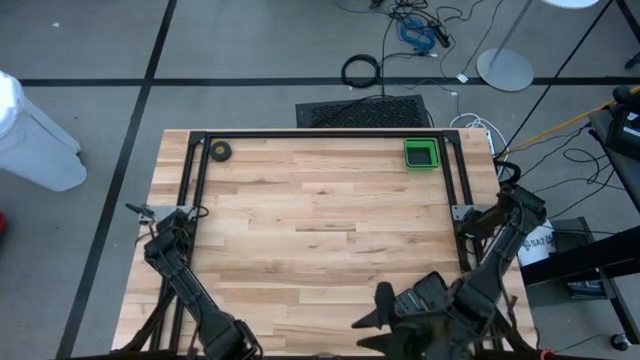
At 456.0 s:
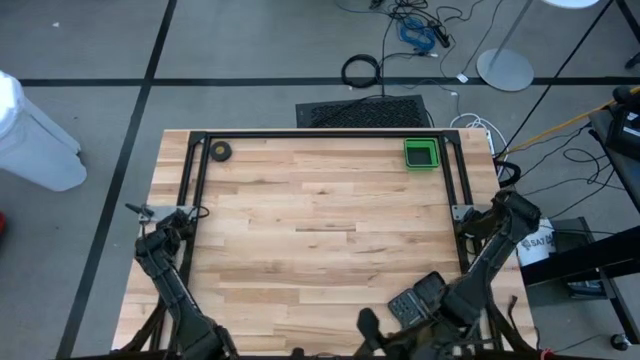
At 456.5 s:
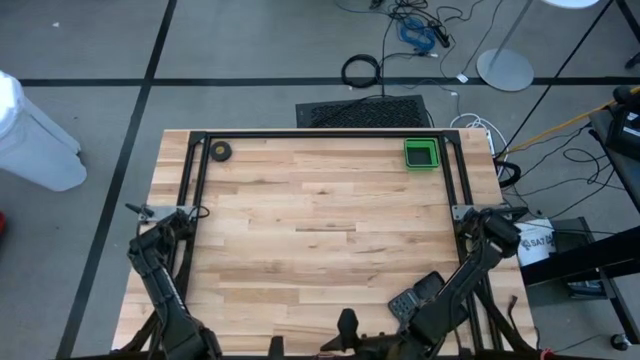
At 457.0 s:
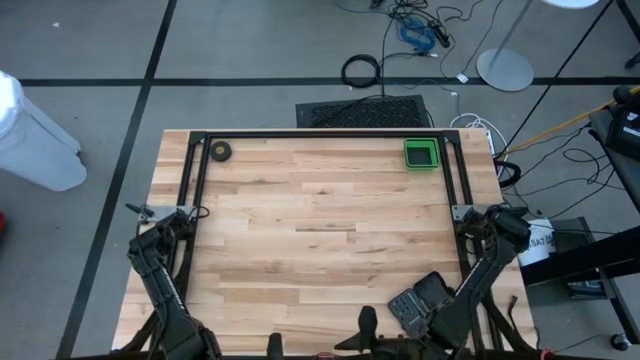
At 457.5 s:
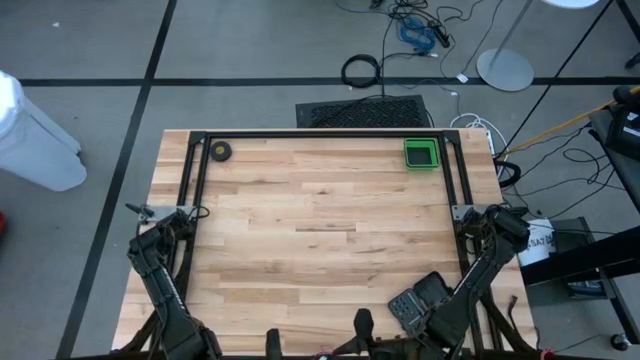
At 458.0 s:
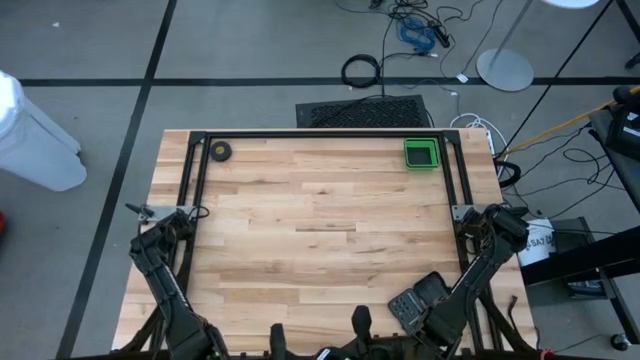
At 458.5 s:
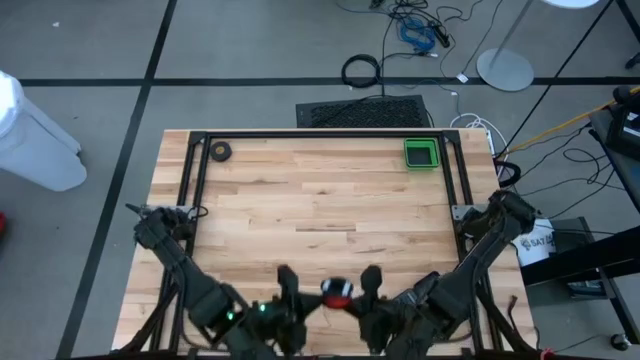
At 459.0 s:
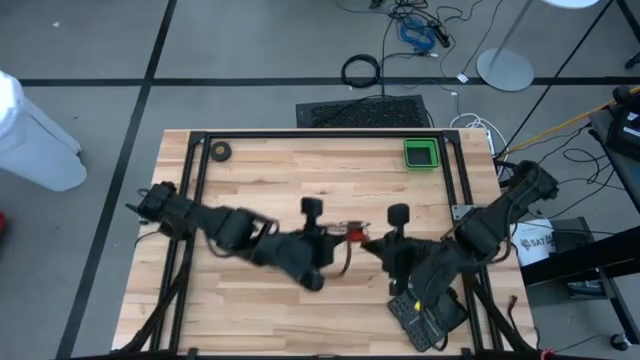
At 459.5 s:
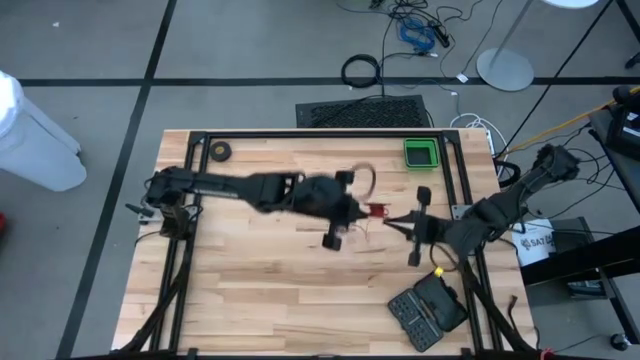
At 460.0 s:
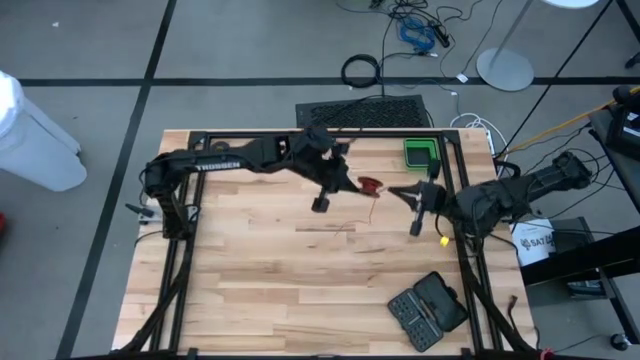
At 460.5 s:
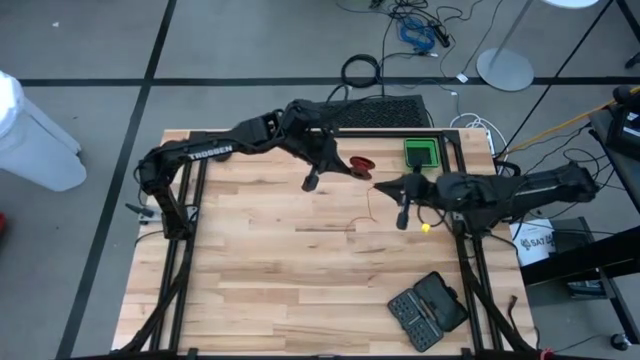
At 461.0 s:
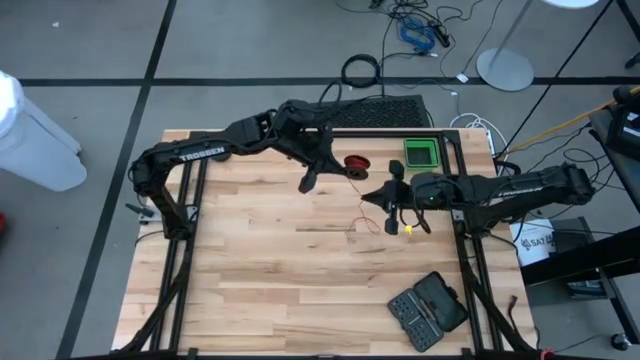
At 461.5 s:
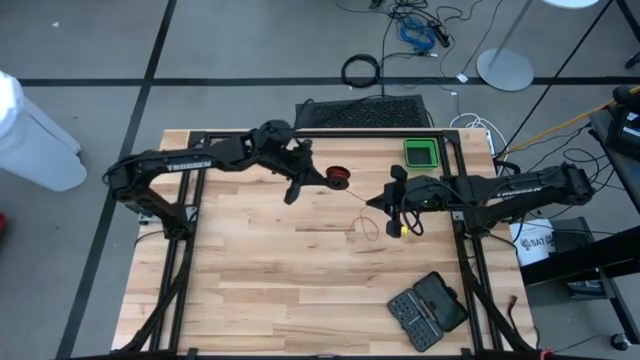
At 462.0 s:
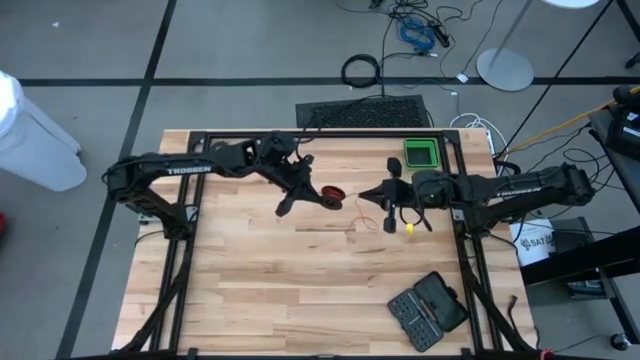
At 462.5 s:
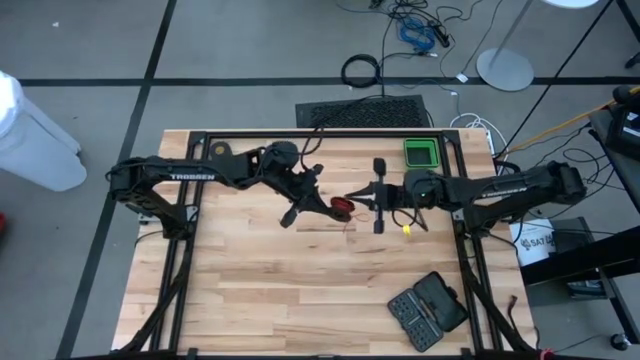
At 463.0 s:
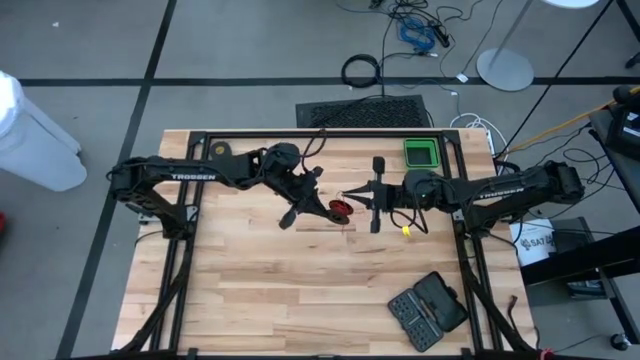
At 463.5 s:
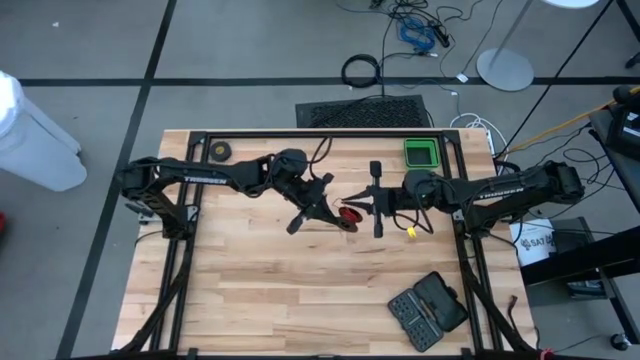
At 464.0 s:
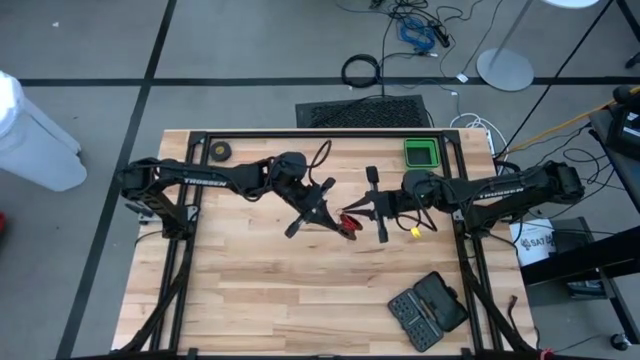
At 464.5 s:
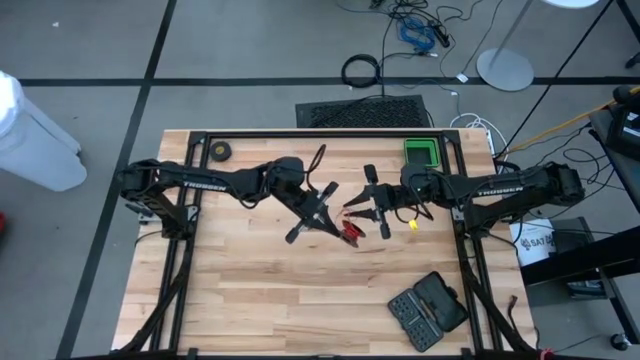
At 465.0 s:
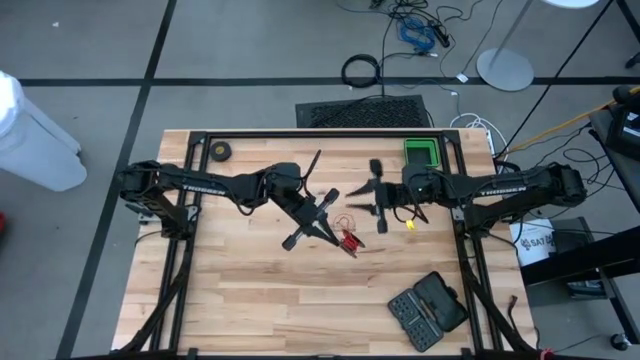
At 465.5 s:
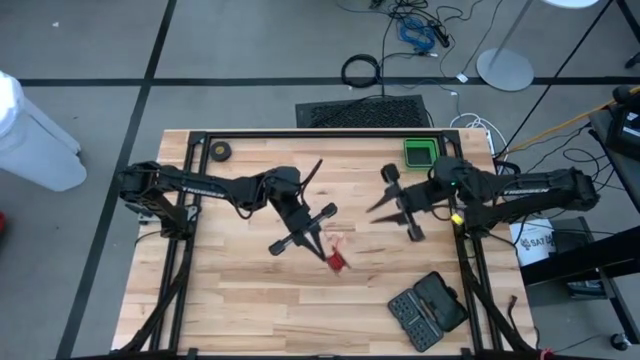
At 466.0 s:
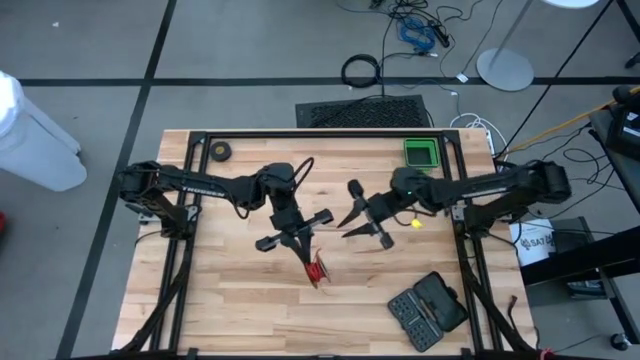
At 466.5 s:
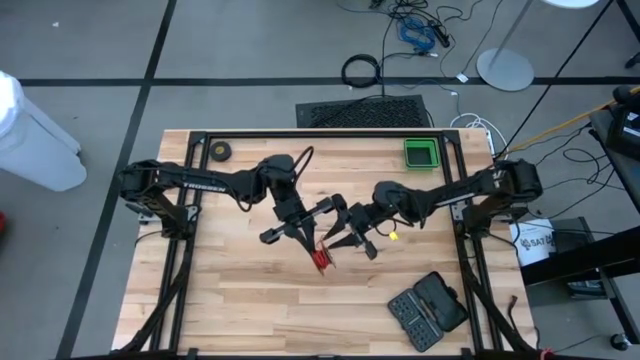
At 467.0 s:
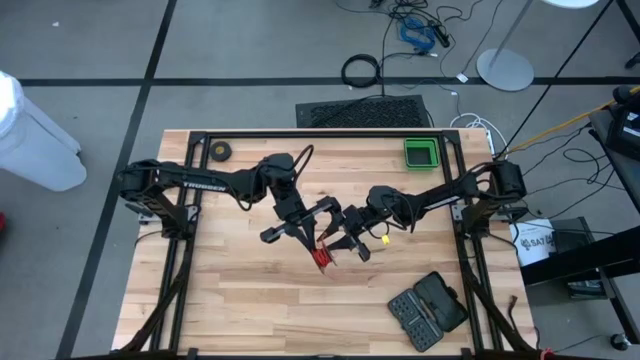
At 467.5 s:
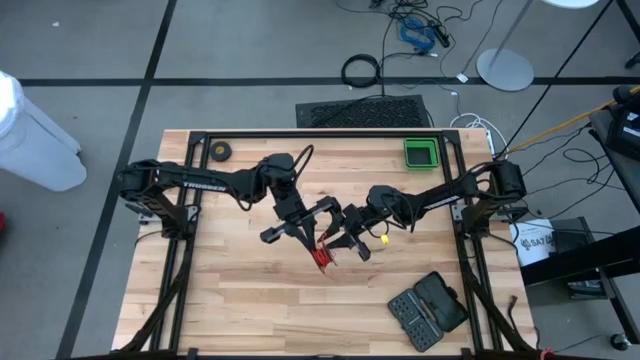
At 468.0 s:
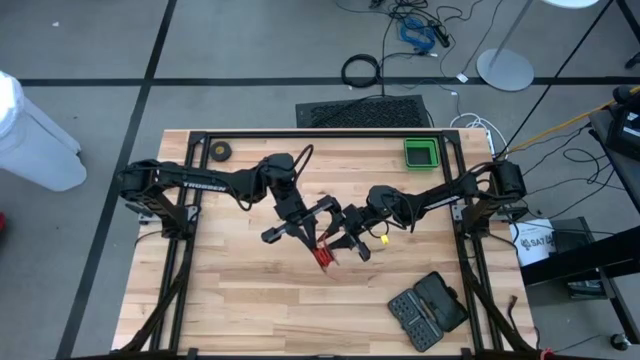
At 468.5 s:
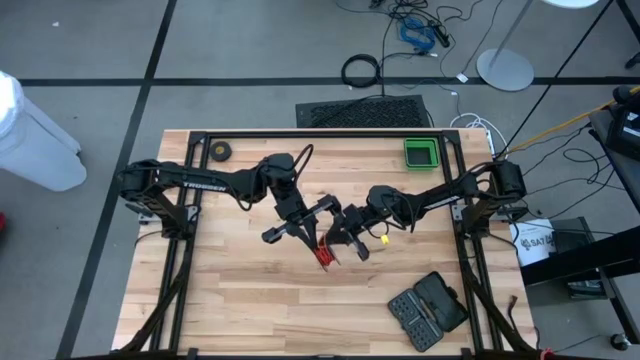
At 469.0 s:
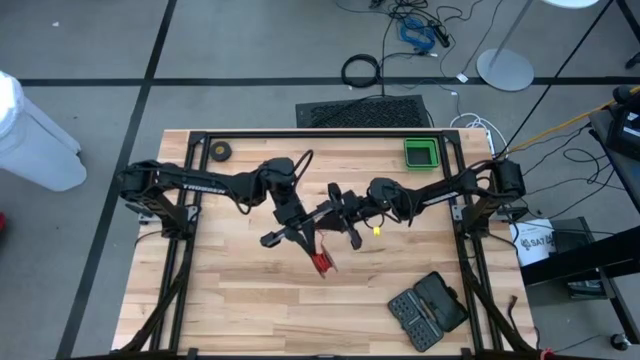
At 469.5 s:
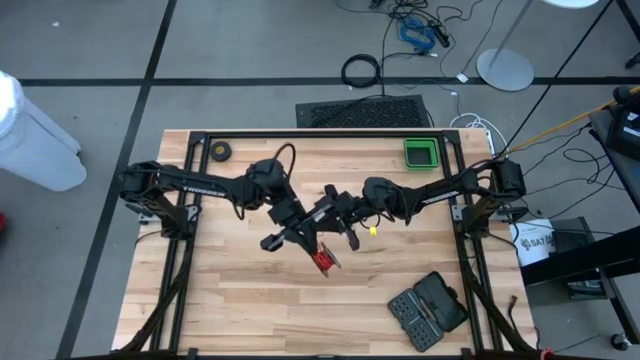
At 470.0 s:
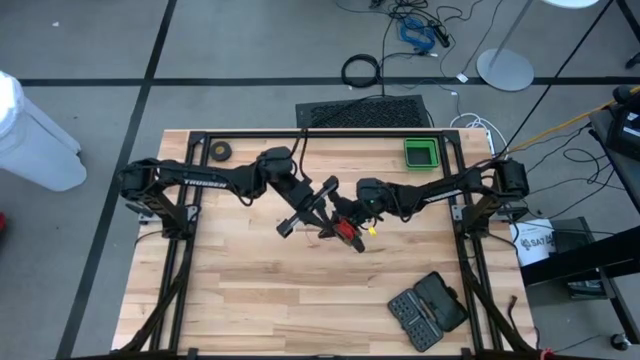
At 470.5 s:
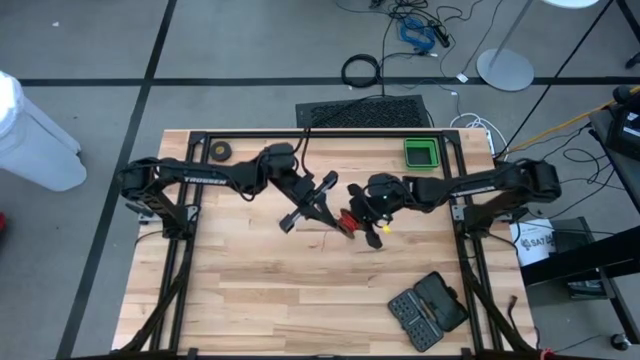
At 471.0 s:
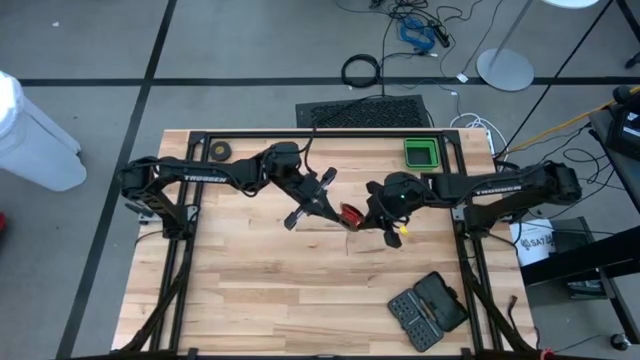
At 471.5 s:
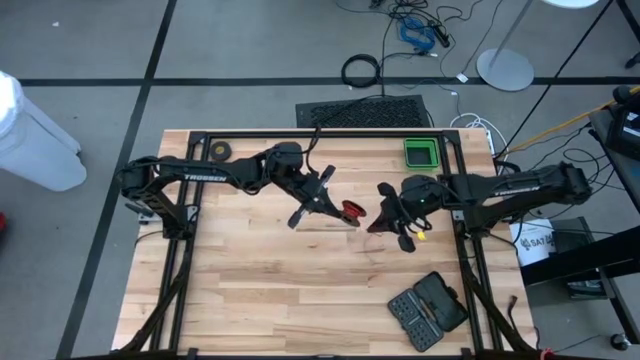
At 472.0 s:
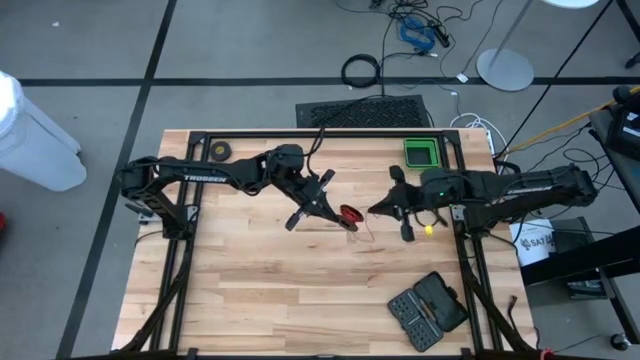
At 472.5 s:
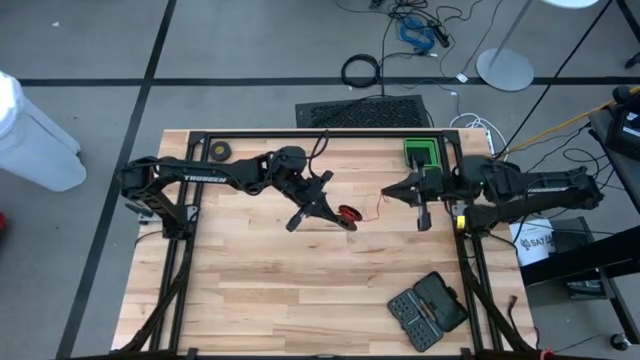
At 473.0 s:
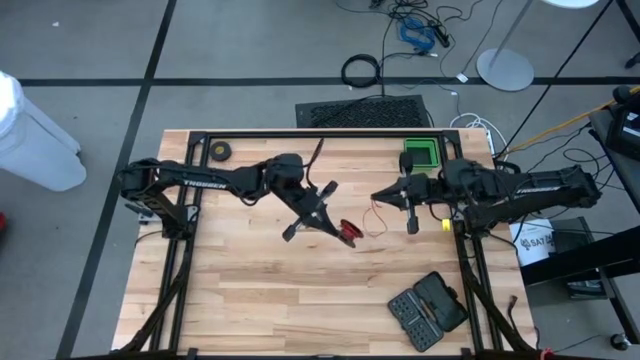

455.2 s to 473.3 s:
Task: Coil cords
Coil the red wire into the spool
